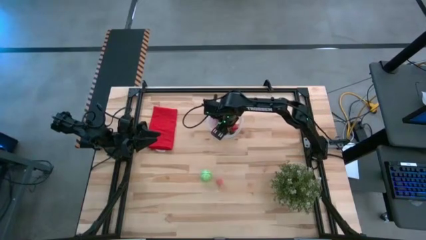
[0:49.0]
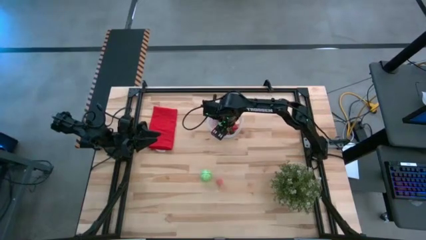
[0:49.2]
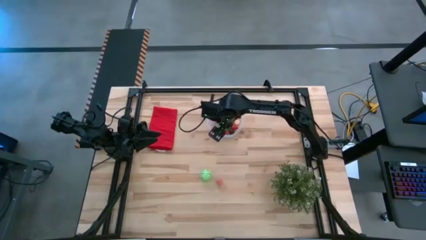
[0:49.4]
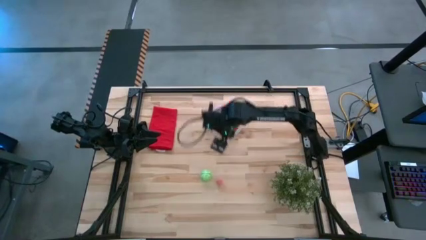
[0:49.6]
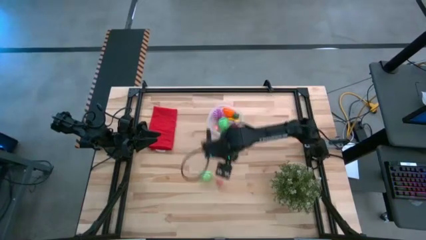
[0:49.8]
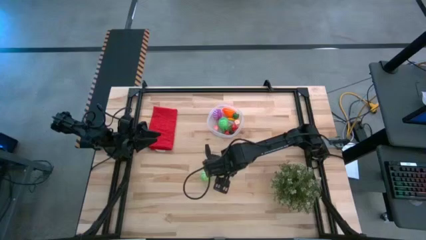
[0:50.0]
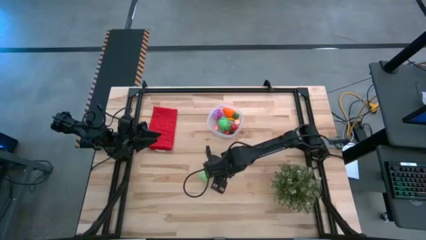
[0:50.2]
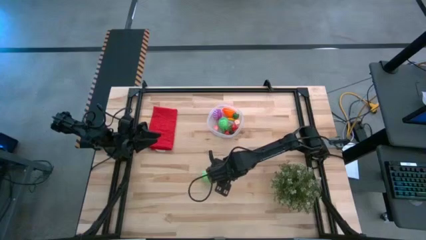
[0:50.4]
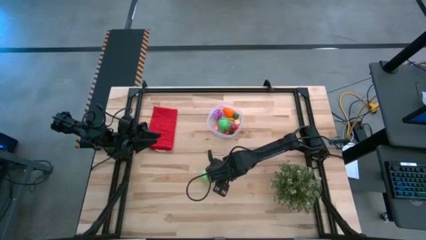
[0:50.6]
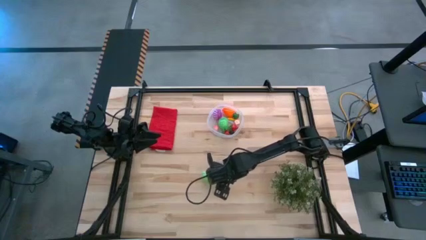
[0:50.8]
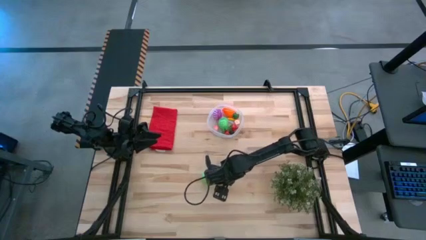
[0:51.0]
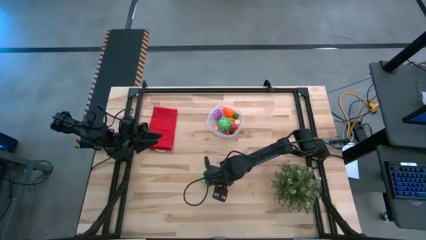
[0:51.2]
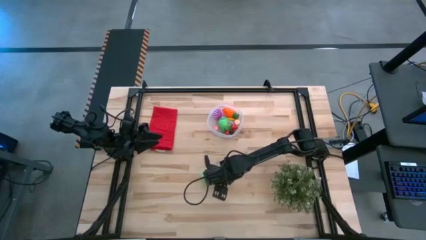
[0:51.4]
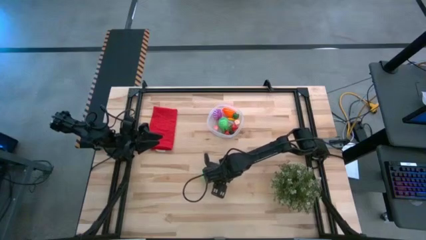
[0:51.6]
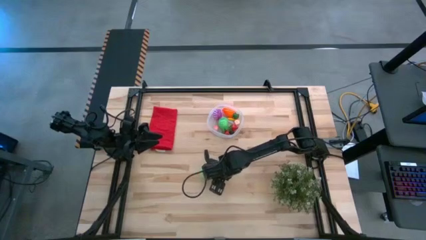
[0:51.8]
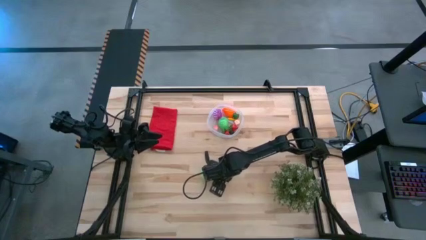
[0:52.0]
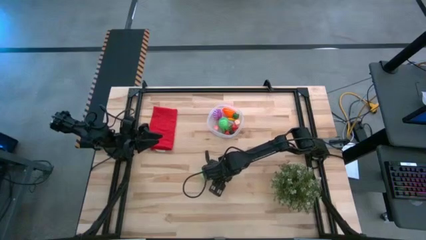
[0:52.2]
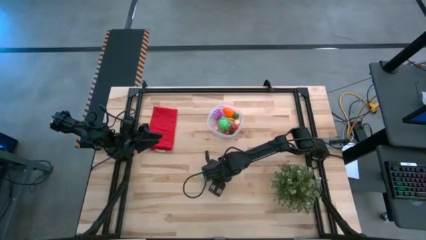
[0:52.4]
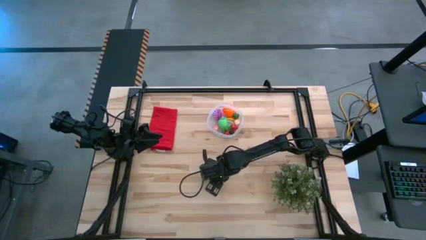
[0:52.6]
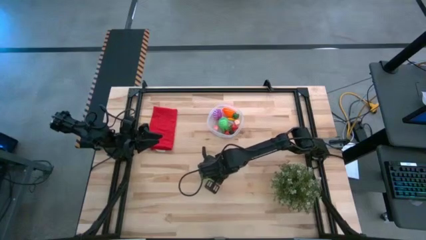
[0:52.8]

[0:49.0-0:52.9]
Task: Pick and placing Produce into tupperware
Put the pink peach into the transparent bin

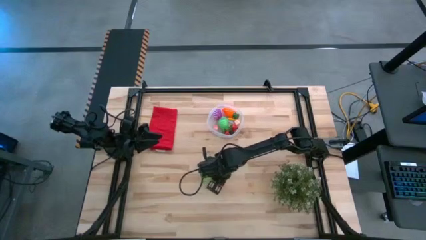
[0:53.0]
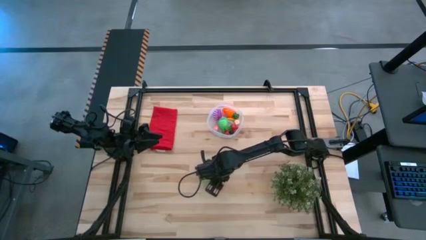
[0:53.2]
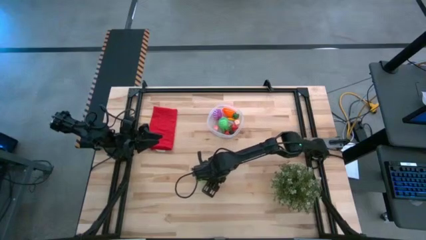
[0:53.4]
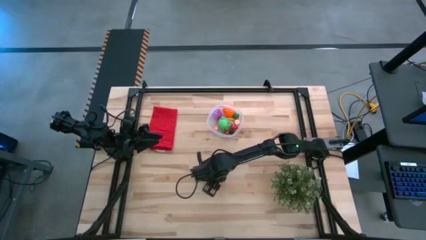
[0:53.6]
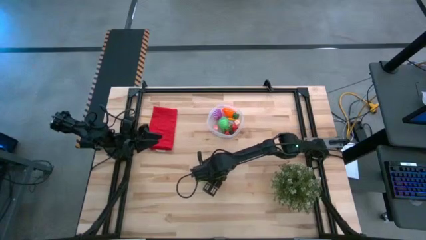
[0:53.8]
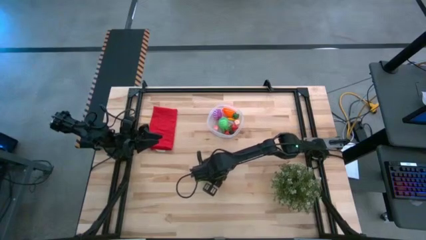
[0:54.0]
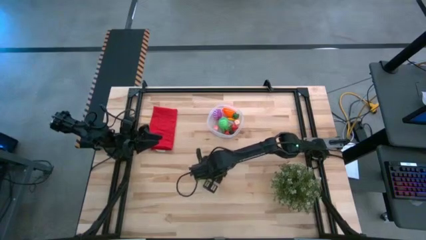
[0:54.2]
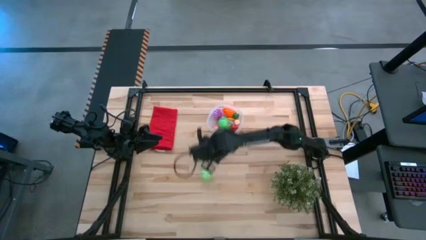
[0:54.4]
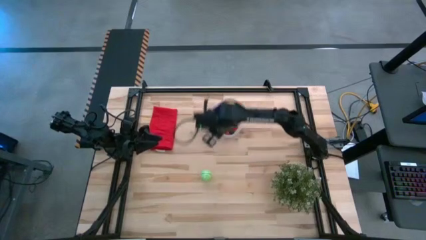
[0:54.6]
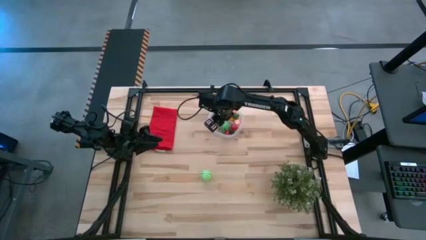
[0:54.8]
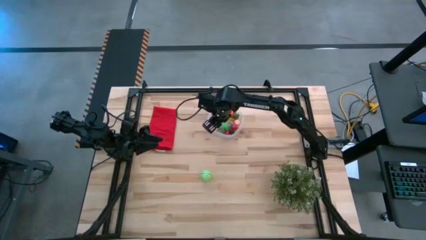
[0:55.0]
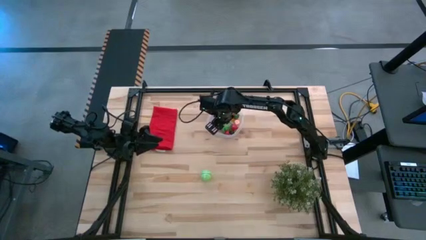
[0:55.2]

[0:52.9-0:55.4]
Put the pink peach into the transparent bin

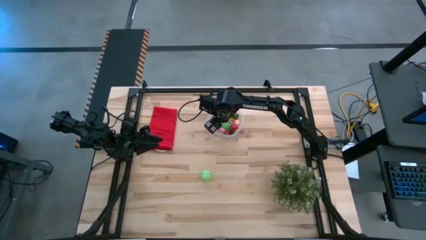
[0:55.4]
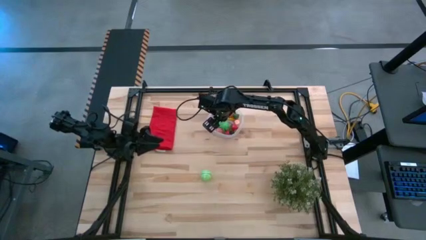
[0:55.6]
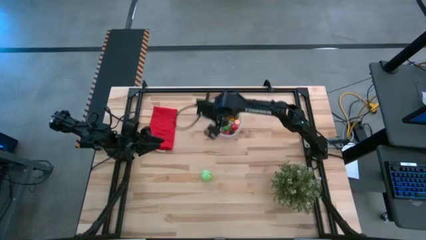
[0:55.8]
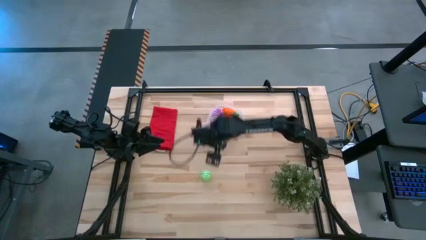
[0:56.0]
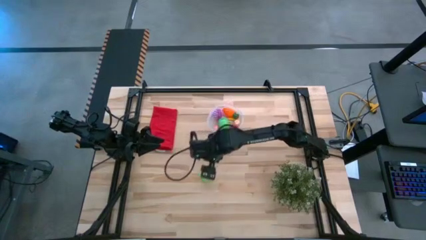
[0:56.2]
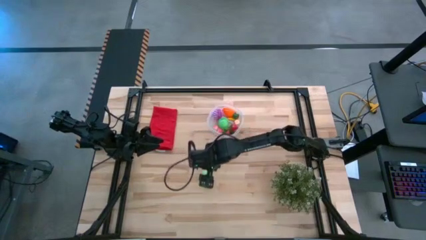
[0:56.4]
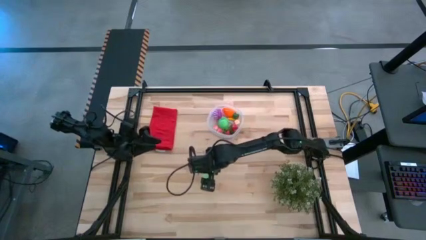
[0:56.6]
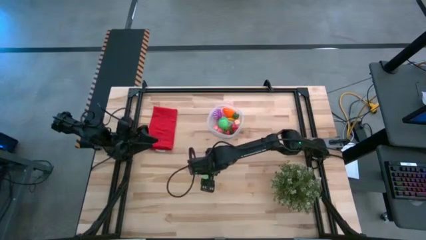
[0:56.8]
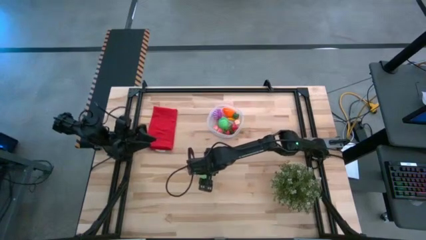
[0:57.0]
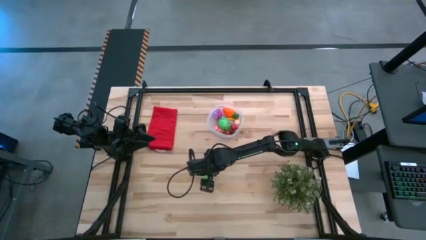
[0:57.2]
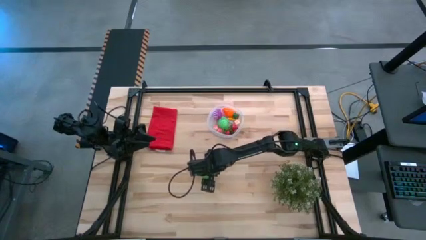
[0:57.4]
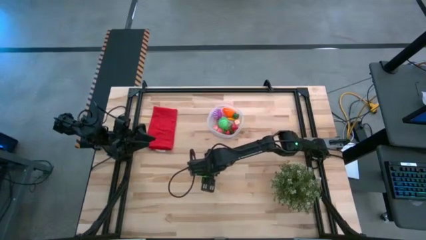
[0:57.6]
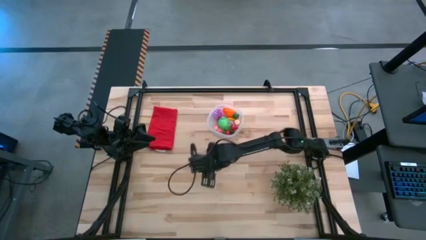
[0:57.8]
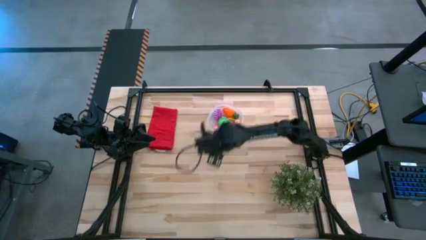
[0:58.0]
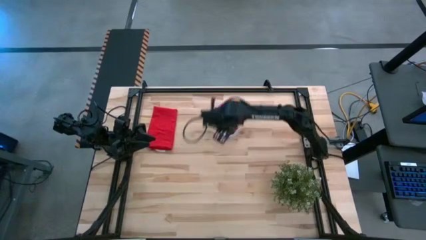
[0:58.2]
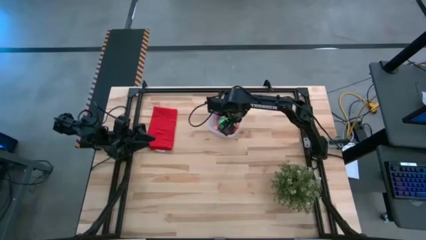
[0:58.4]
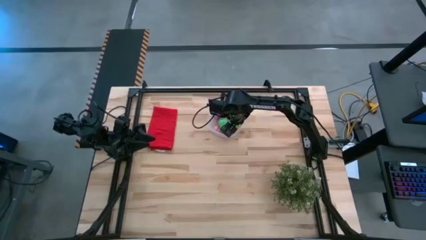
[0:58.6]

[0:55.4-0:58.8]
Put the green cabbage into the transparent bin

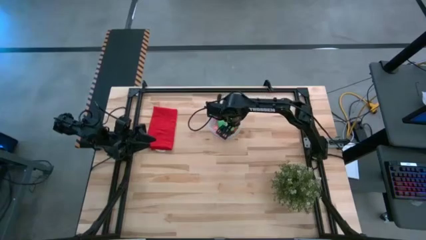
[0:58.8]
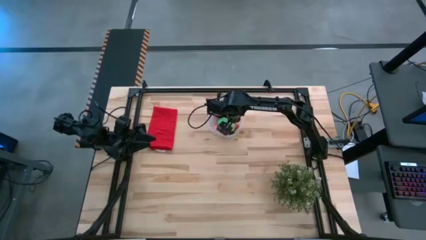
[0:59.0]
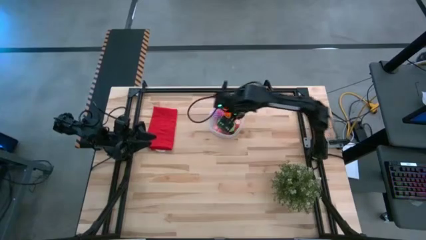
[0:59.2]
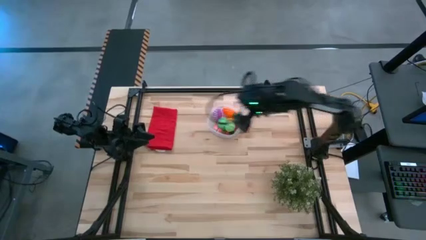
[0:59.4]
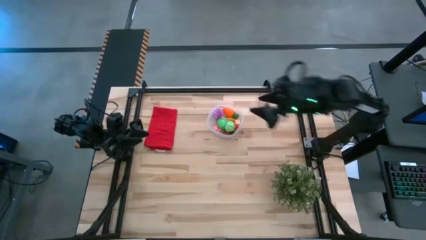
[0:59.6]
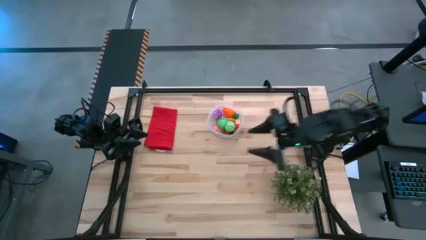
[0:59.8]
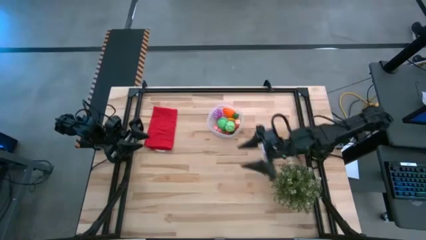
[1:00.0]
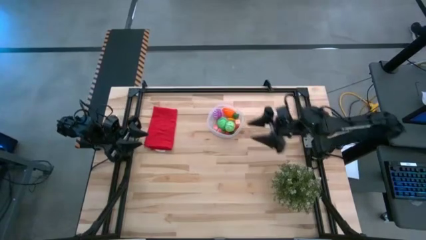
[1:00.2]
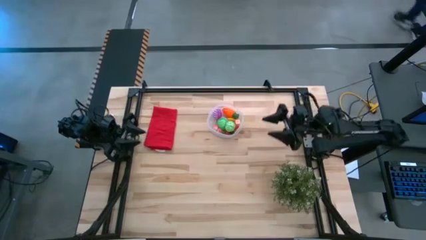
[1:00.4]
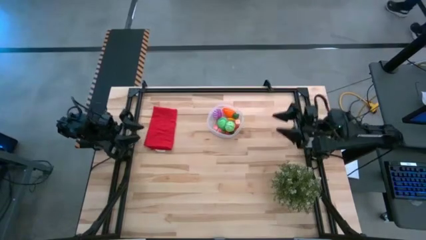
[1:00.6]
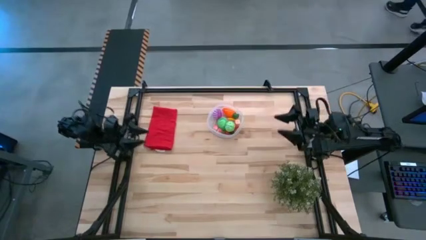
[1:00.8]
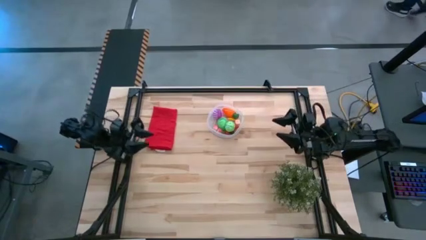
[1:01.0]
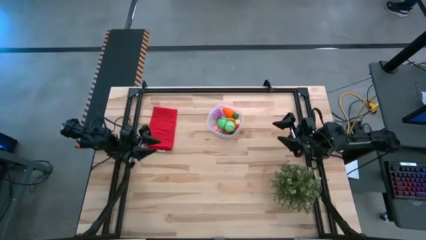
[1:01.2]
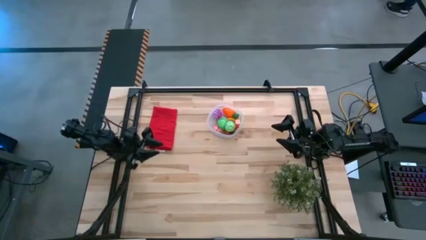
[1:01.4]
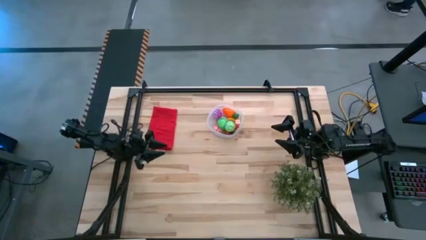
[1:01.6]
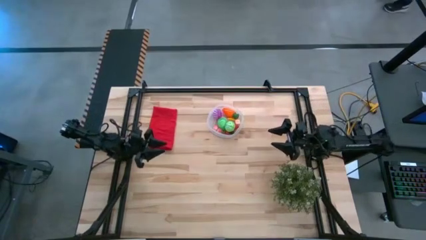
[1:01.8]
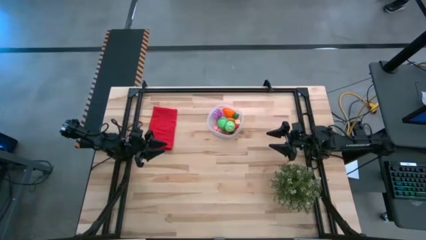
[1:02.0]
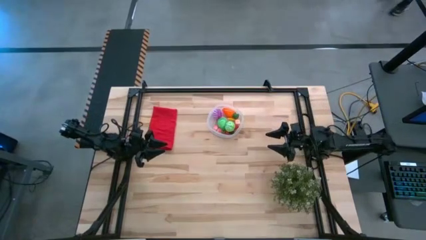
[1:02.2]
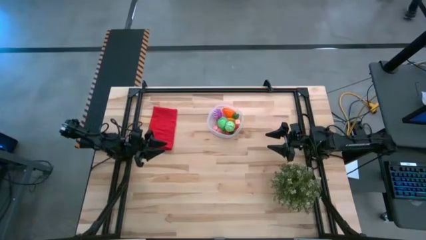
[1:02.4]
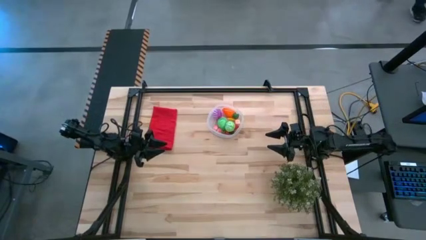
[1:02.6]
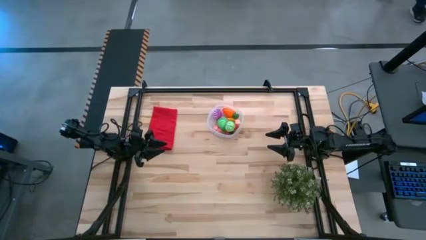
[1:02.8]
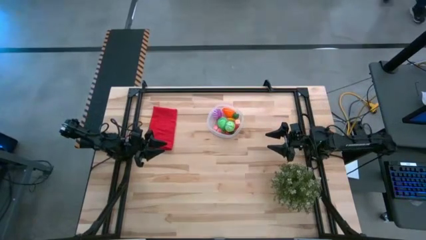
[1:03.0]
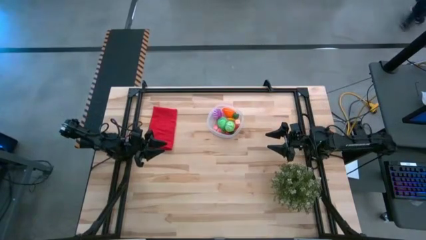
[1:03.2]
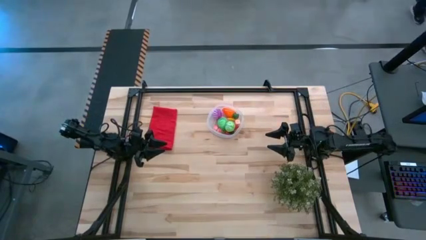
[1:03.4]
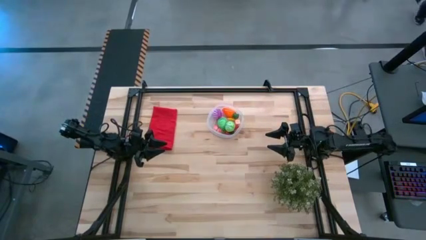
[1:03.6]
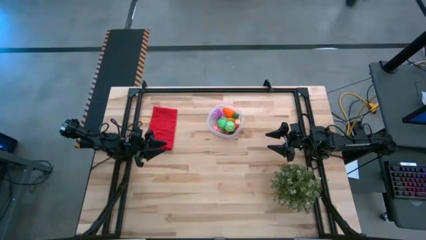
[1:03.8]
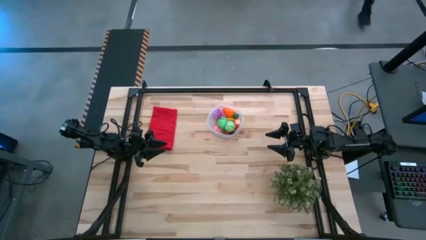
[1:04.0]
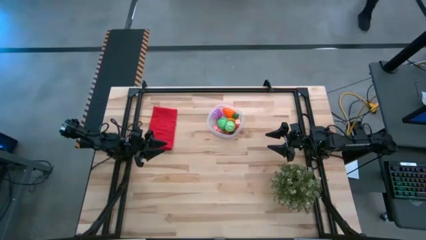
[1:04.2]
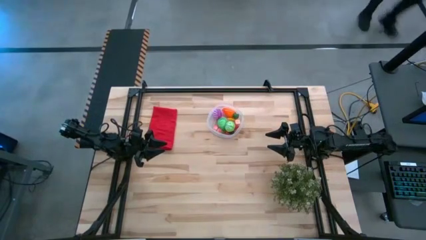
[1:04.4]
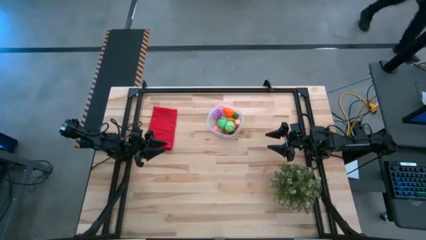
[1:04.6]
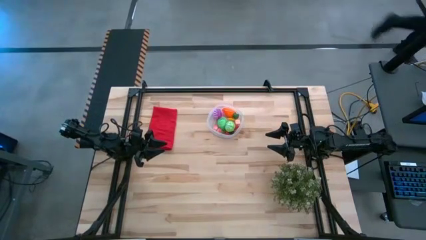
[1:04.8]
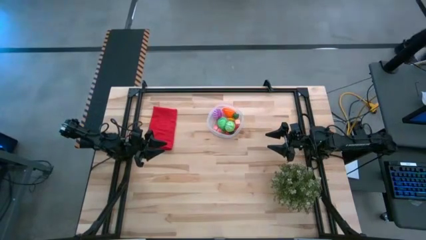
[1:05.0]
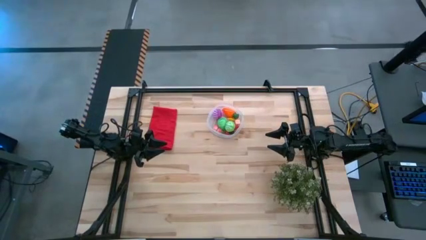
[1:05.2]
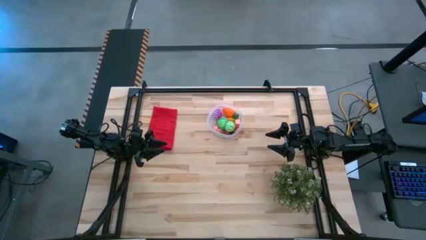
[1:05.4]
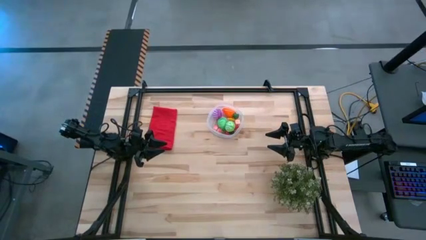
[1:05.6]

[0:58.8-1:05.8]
Return to Home Position
